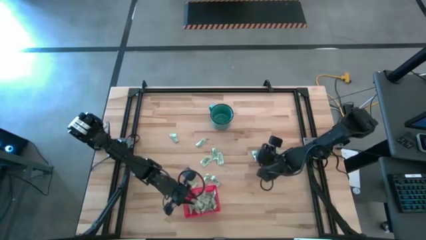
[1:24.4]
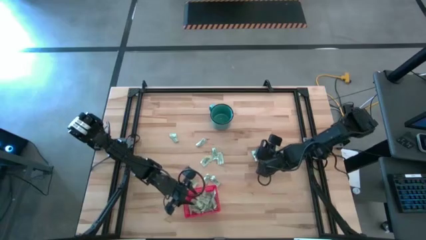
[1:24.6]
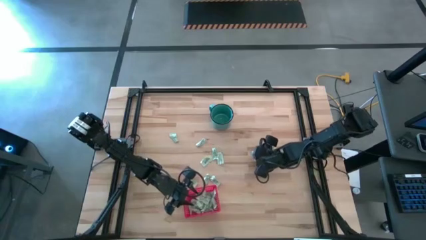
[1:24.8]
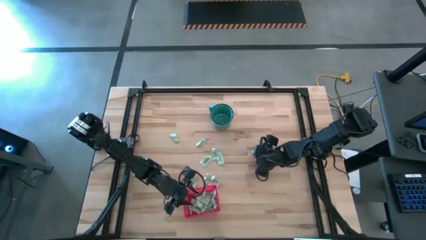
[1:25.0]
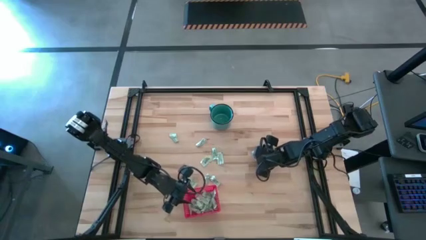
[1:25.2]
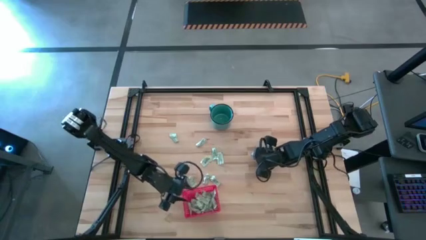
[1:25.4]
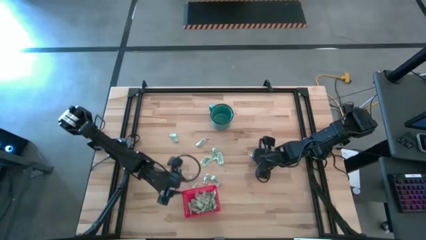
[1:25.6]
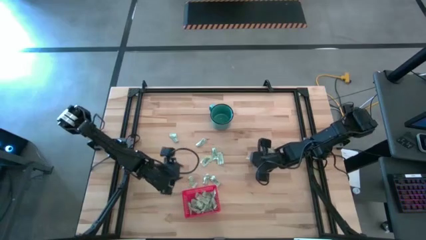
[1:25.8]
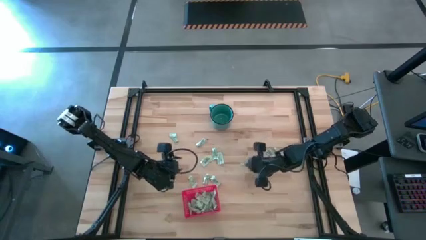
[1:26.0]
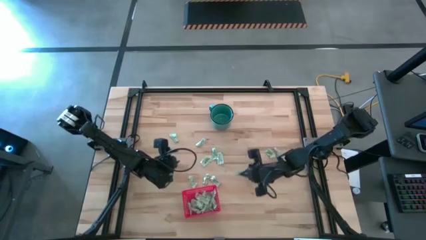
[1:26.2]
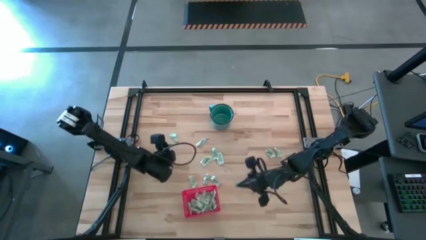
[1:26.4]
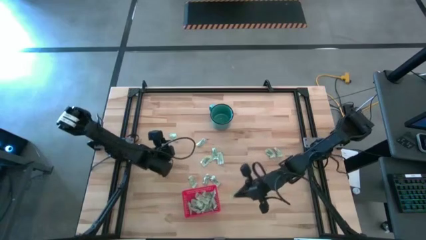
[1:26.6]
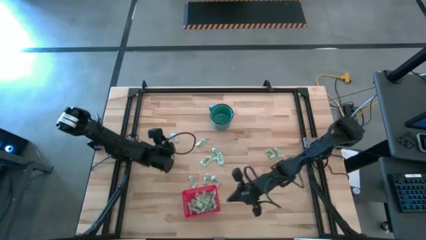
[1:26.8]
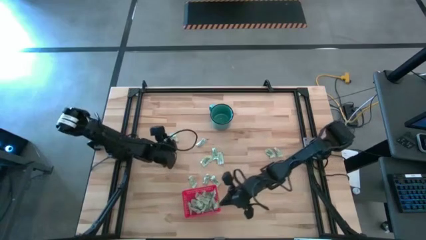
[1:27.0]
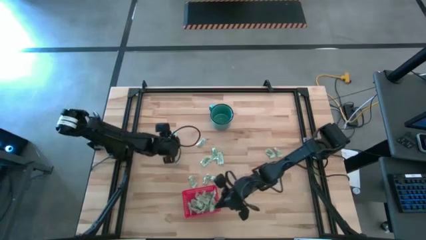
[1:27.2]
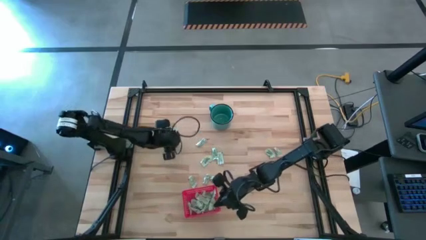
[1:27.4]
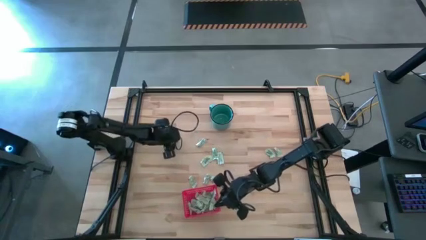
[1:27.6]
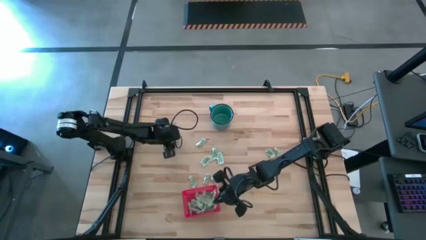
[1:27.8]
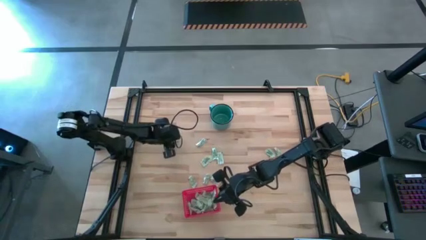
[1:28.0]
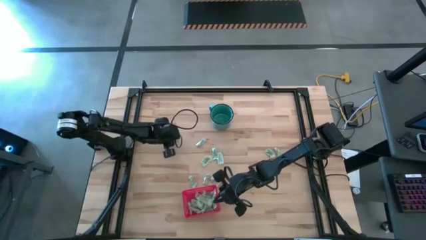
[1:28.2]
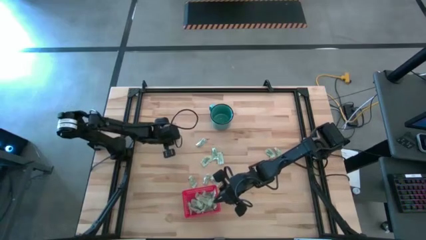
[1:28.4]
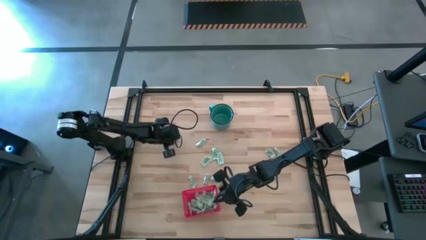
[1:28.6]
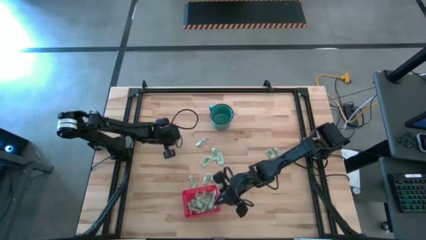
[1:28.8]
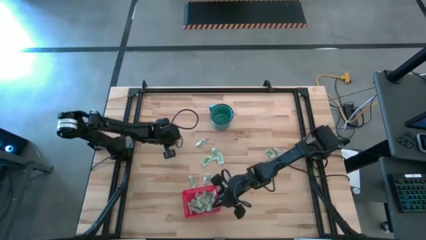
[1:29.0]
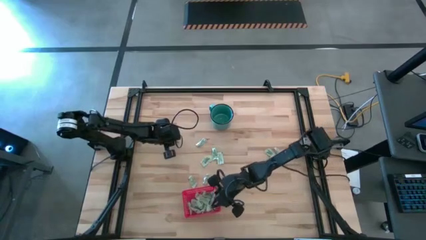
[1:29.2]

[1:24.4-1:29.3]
Task: Pick and place items into bin
Put the green stevia packet into the red bin

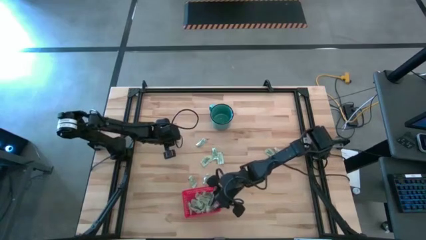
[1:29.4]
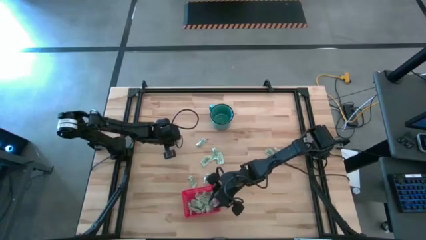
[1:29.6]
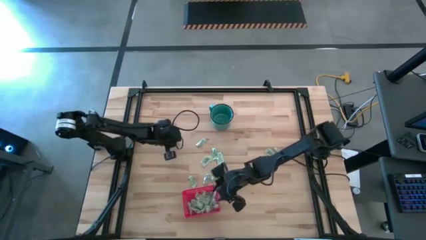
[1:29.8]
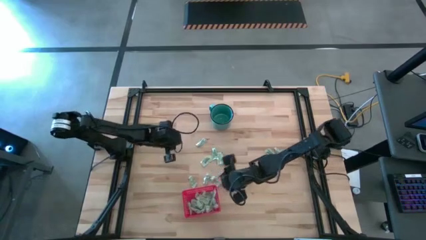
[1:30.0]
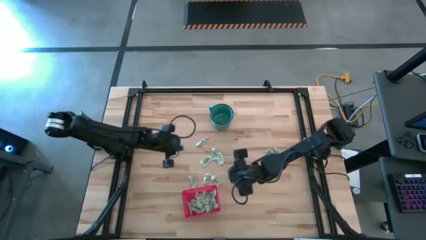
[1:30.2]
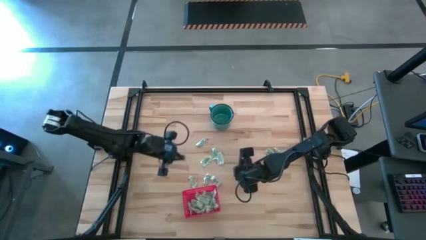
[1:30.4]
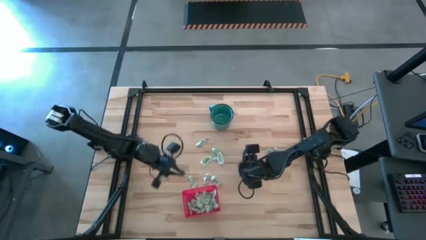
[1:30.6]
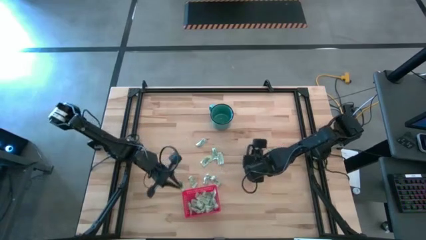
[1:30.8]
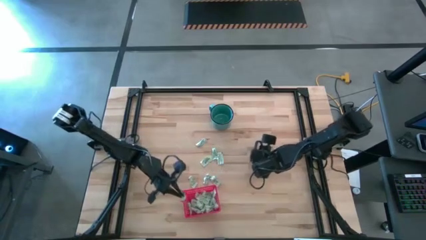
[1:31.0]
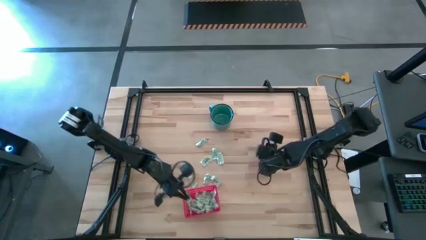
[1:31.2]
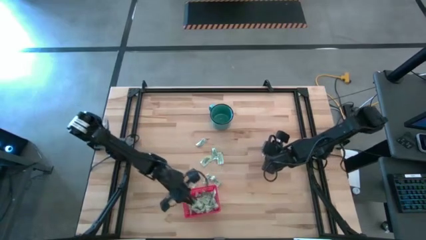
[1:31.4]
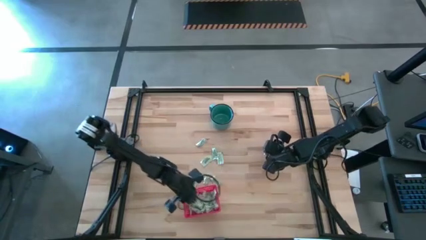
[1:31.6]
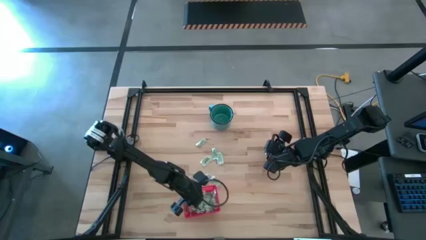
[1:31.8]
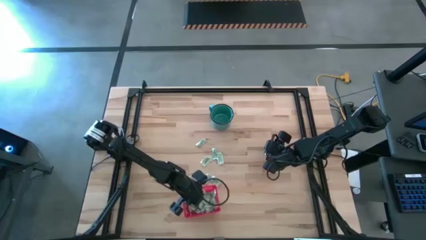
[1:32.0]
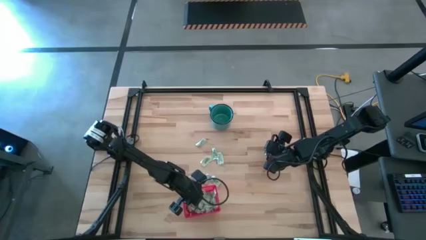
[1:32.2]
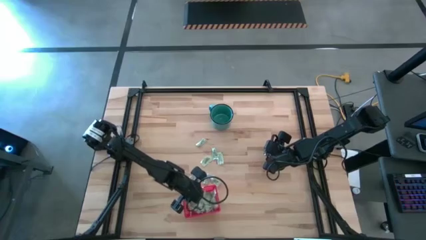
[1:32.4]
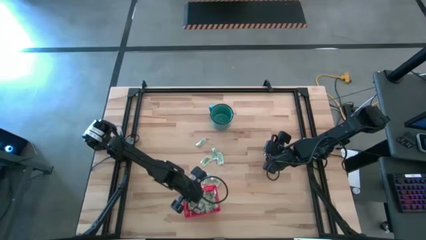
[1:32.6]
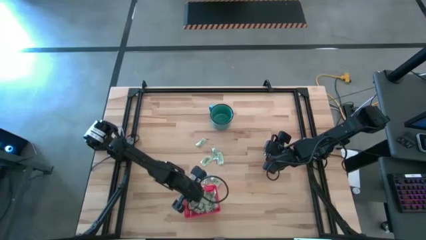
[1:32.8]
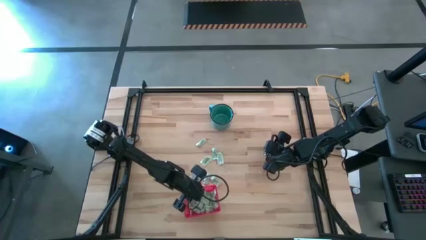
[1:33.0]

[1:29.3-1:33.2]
Put the green stevia packet into the red bin

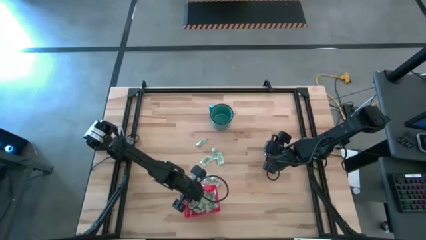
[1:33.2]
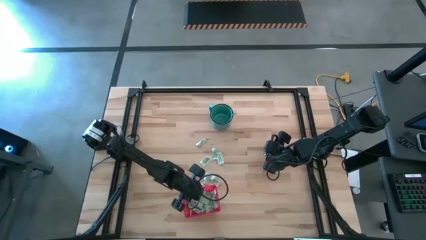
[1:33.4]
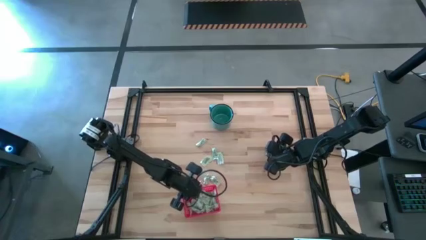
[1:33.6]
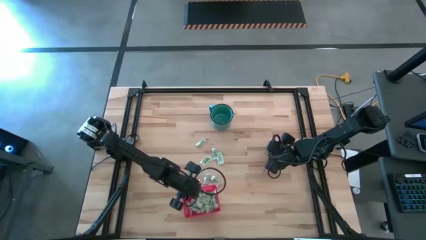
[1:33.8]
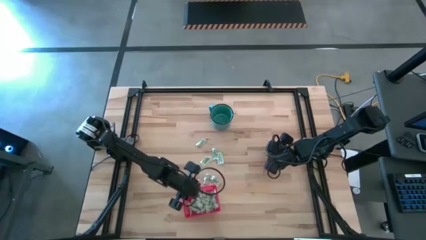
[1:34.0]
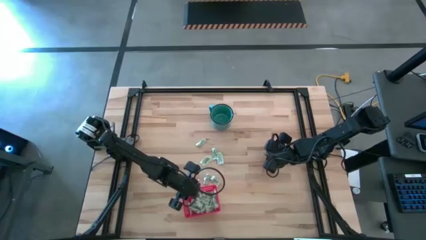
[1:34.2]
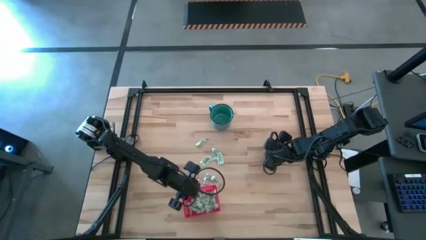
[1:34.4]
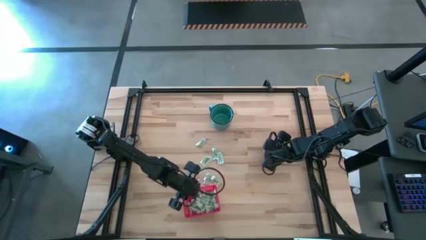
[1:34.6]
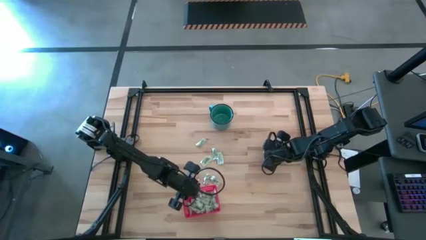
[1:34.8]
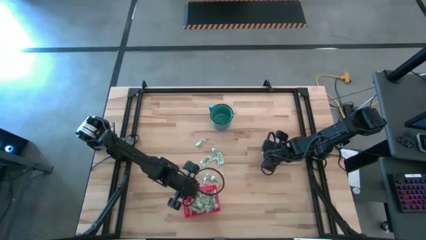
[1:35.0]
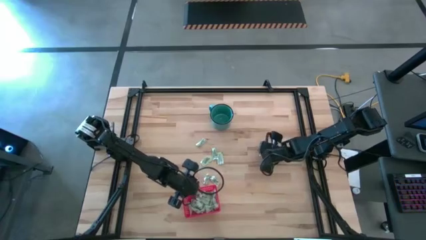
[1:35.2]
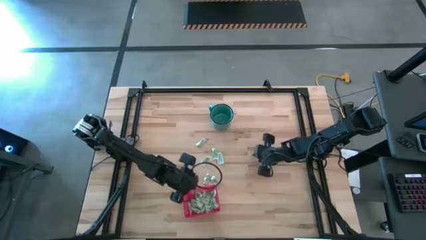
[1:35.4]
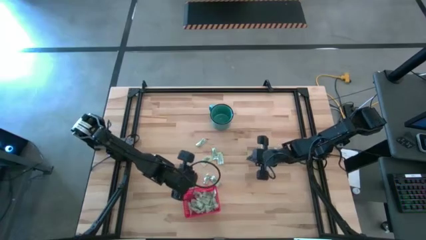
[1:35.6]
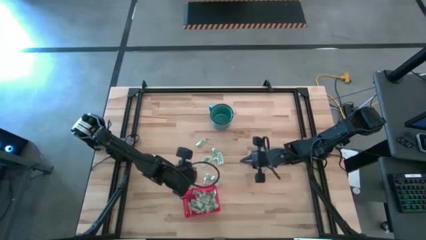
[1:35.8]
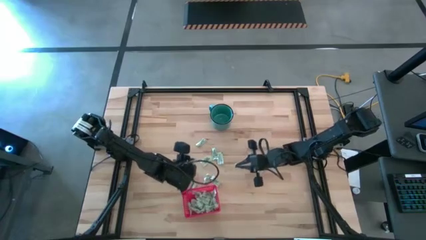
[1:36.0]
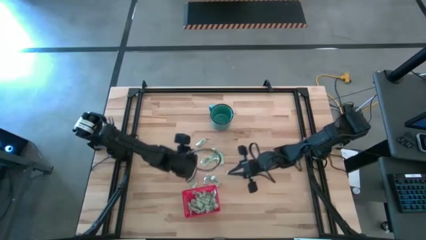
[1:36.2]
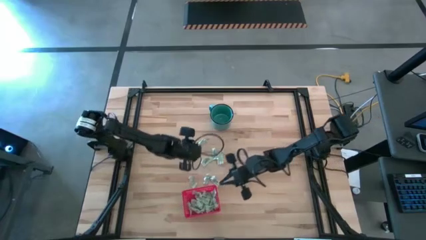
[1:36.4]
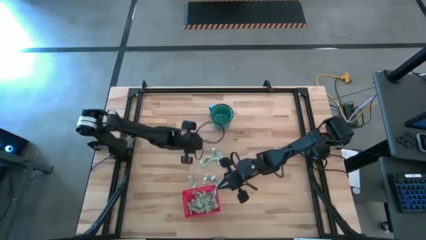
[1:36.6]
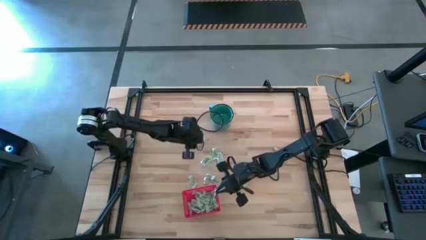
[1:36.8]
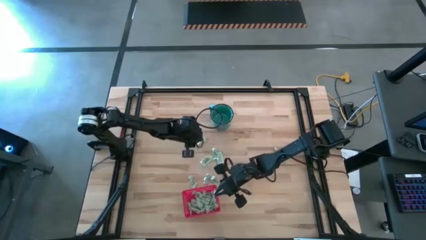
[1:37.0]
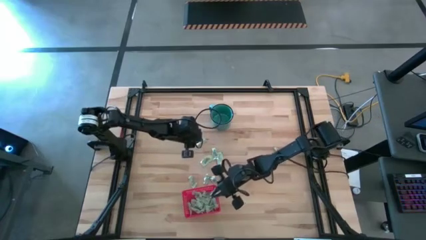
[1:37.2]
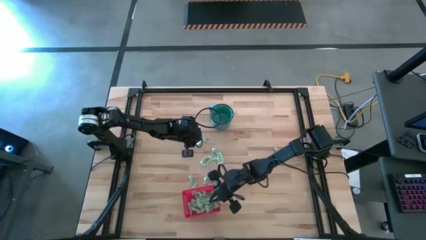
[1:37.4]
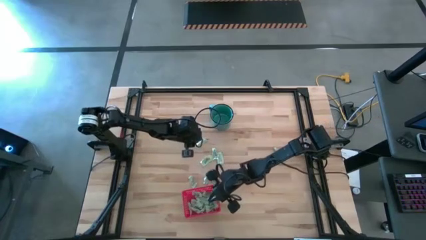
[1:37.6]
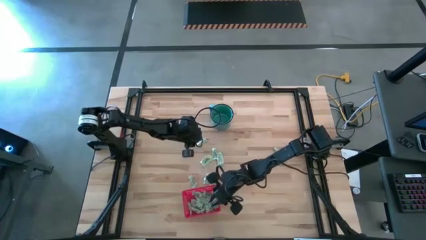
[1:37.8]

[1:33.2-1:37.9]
Put the green stevia packet into the red bin

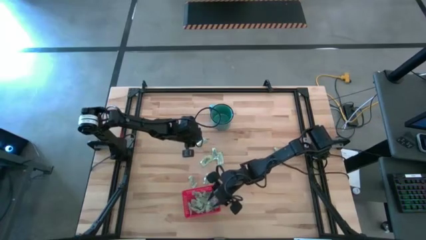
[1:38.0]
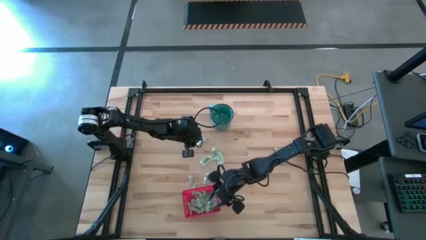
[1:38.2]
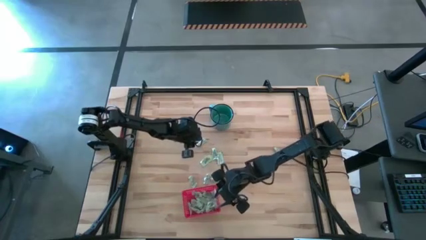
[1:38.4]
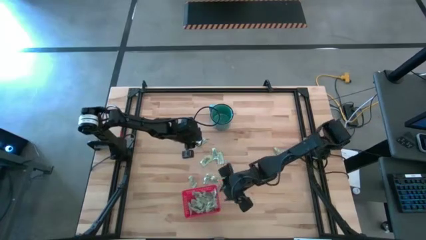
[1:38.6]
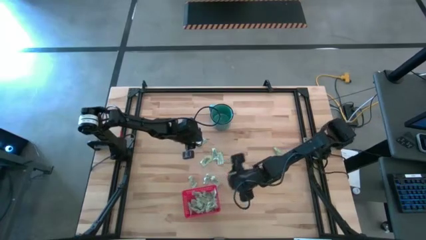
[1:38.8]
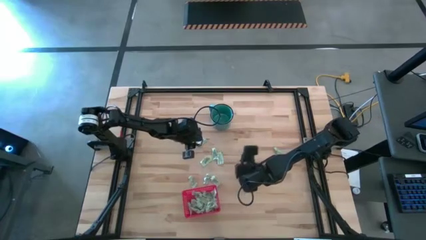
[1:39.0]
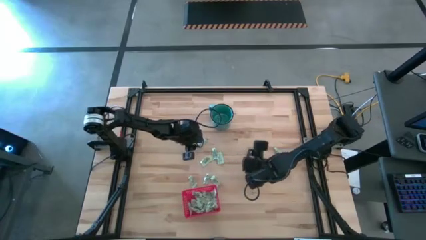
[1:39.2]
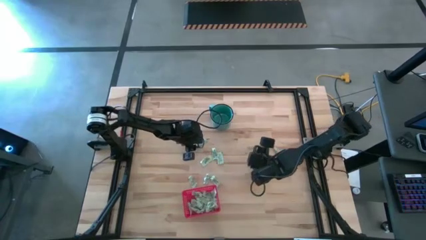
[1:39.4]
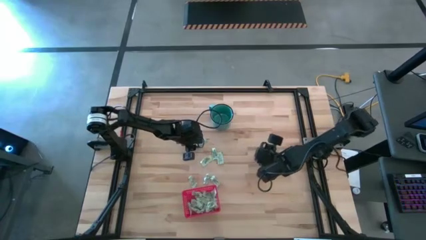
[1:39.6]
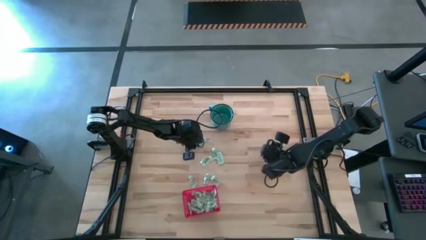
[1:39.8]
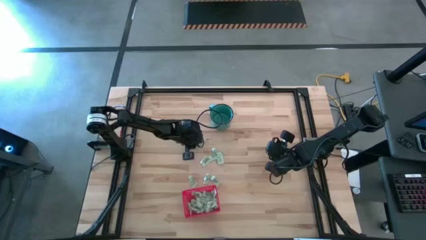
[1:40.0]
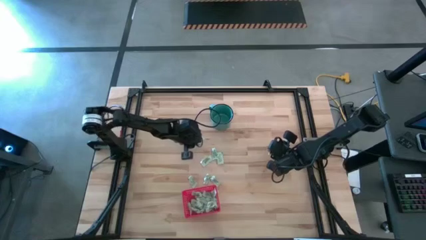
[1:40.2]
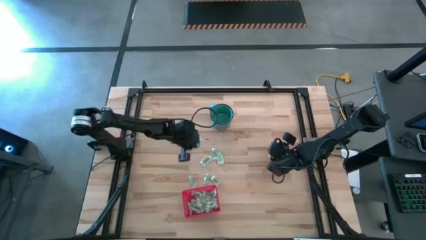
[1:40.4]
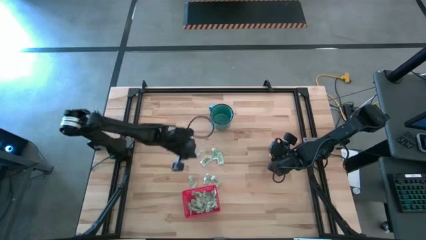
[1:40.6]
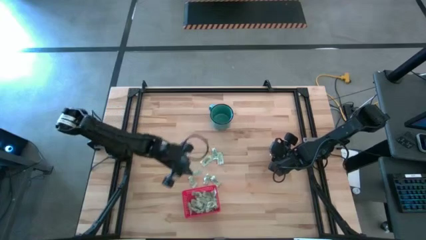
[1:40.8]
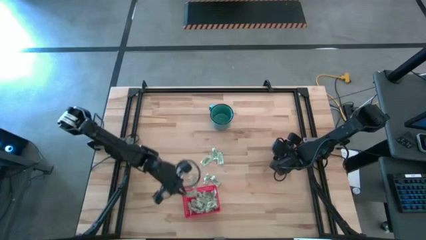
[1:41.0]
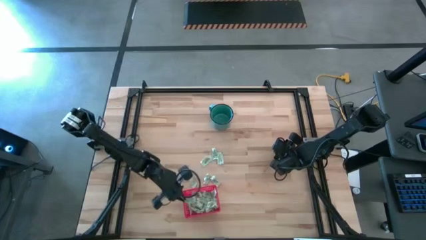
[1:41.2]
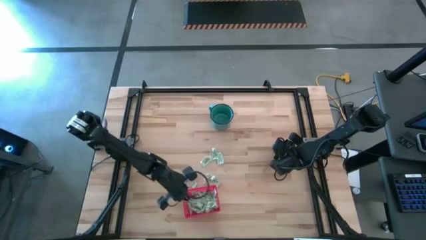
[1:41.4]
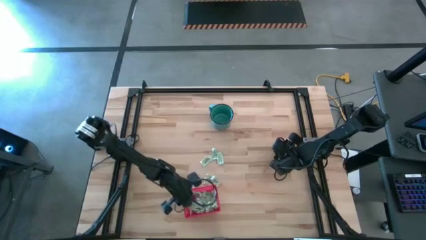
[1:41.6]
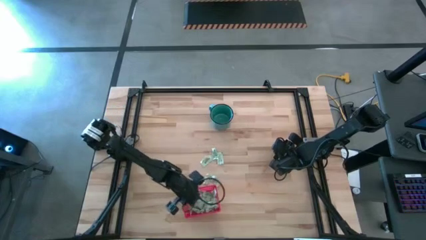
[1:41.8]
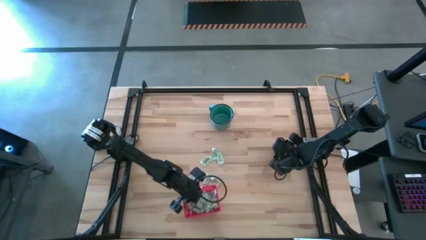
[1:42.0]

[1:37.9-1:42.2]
Put the green stevia packet into the red bin
